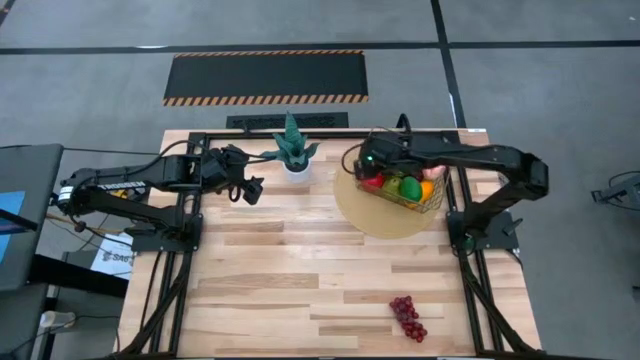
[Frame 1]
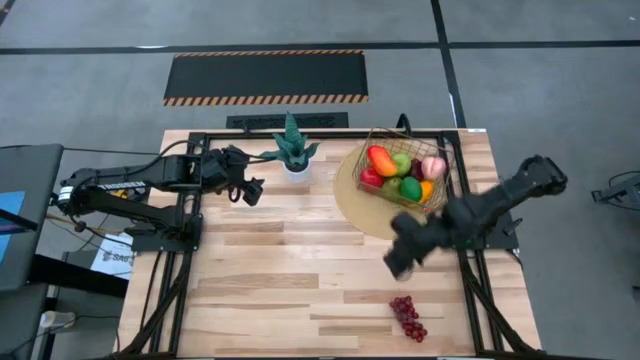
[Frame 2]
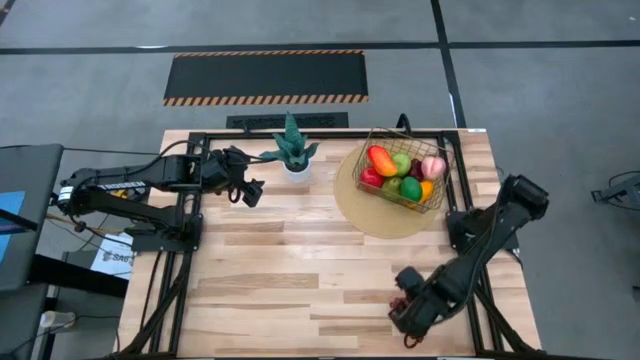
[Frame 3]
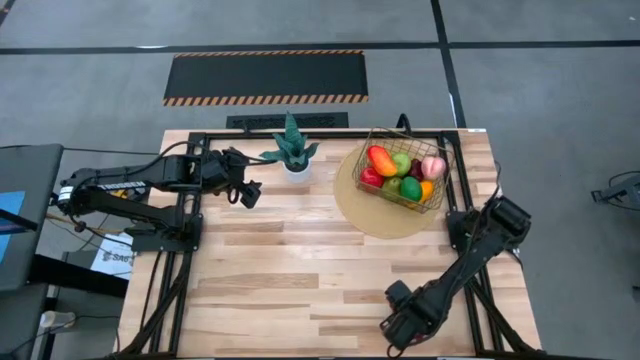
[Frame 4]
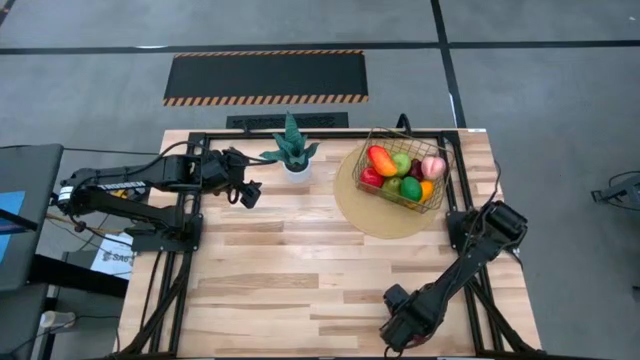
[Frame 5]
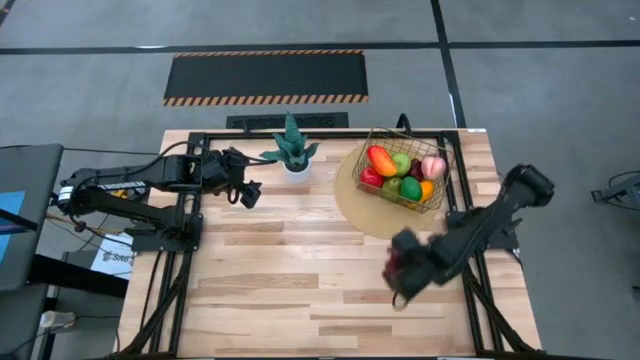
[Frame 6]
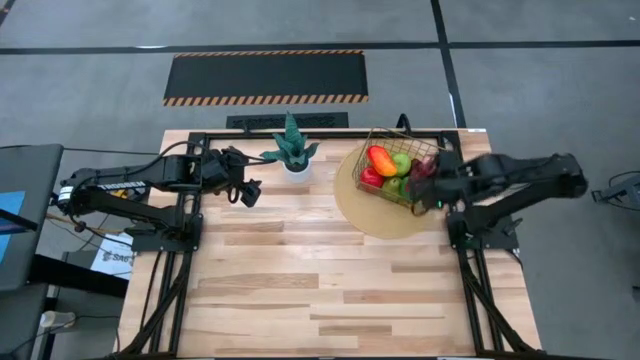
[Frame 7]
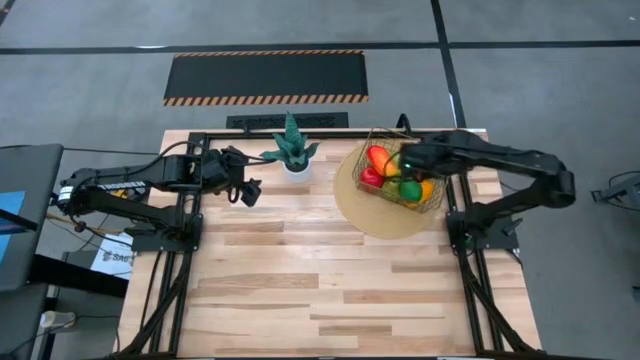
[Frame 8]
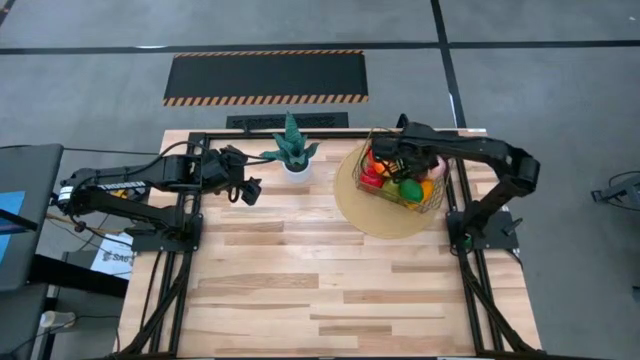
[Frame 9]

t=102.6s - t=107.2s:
Task: Build produce basket
Put the grapes into the wire basket

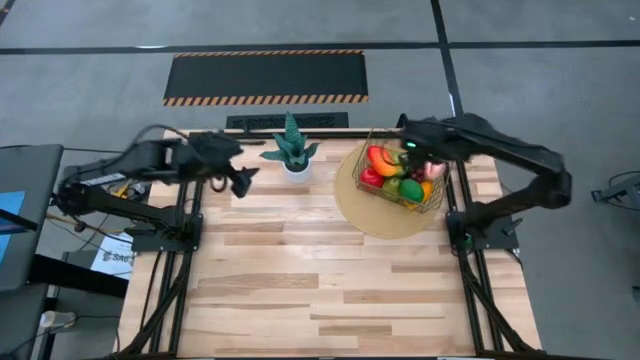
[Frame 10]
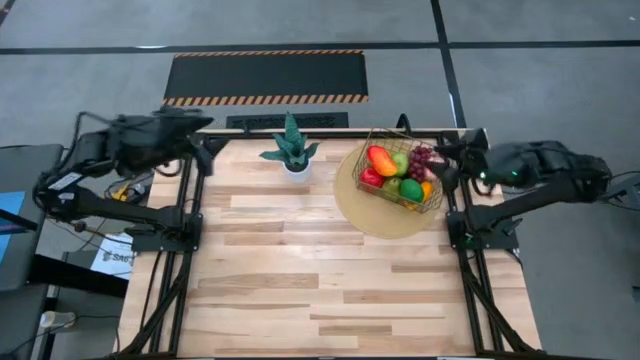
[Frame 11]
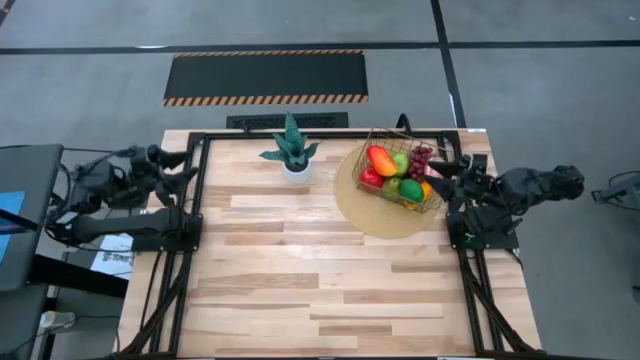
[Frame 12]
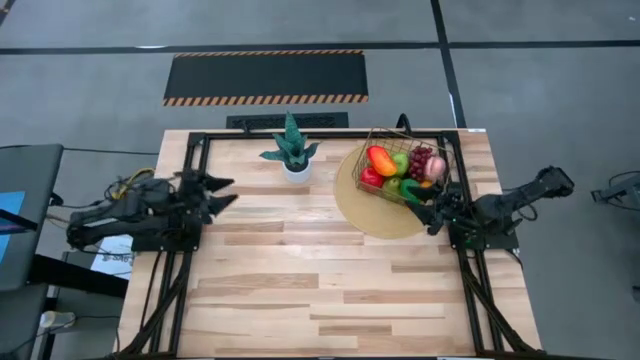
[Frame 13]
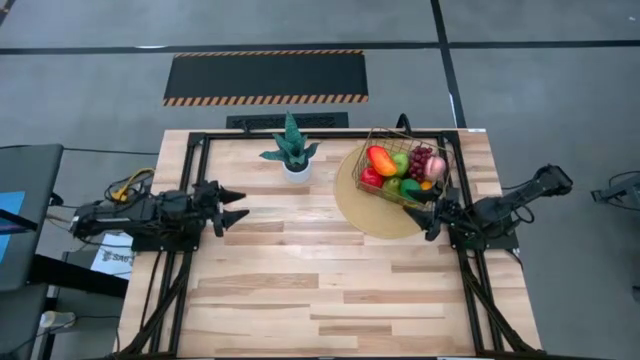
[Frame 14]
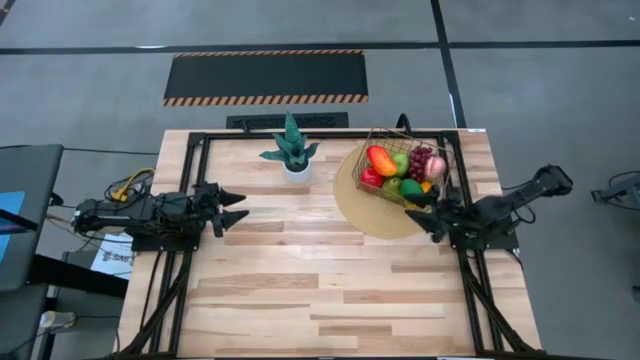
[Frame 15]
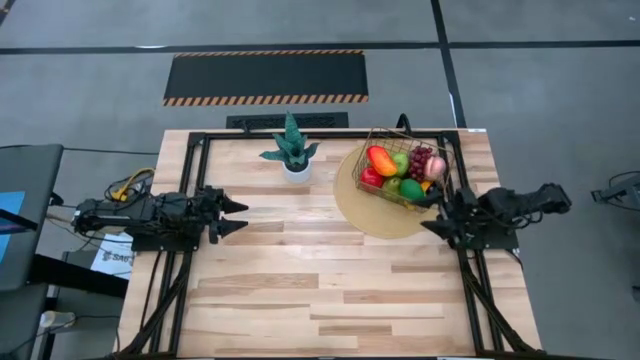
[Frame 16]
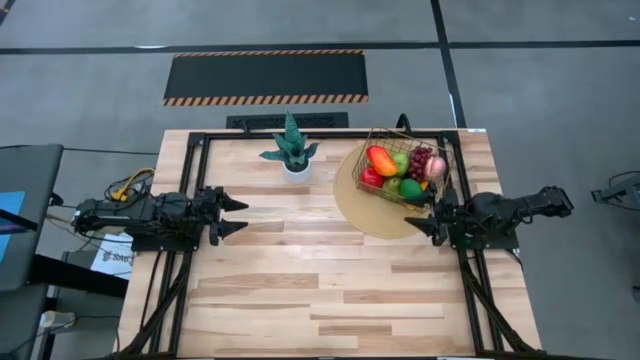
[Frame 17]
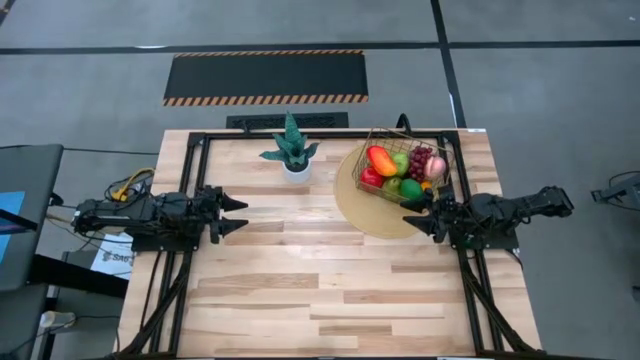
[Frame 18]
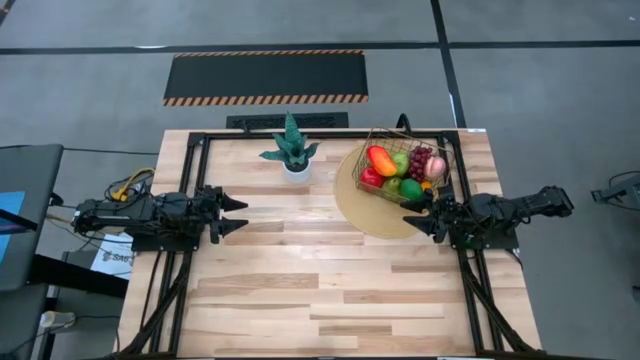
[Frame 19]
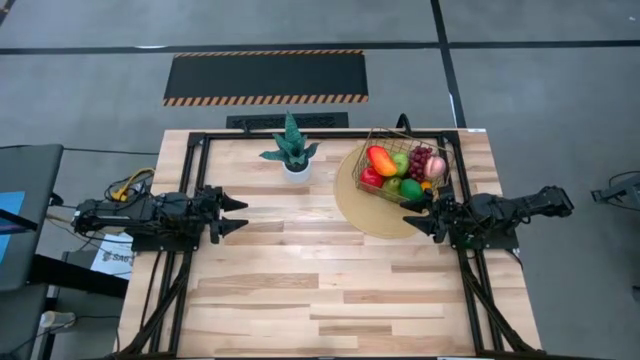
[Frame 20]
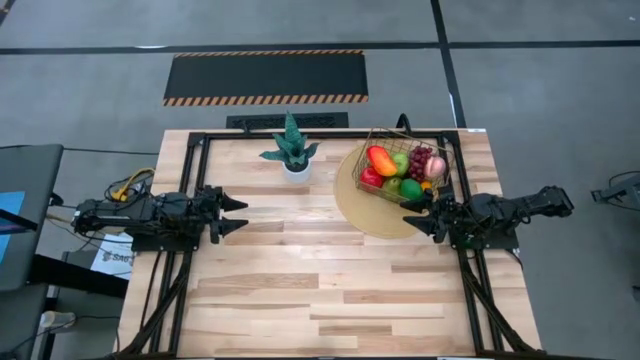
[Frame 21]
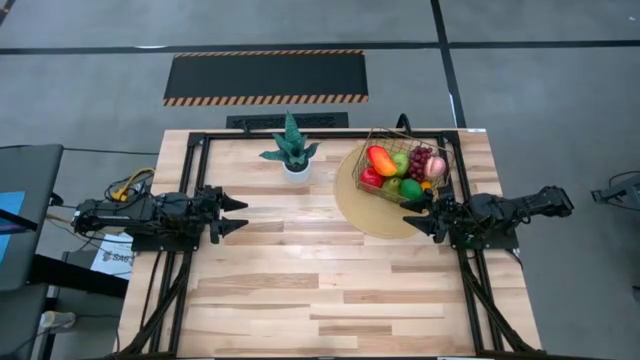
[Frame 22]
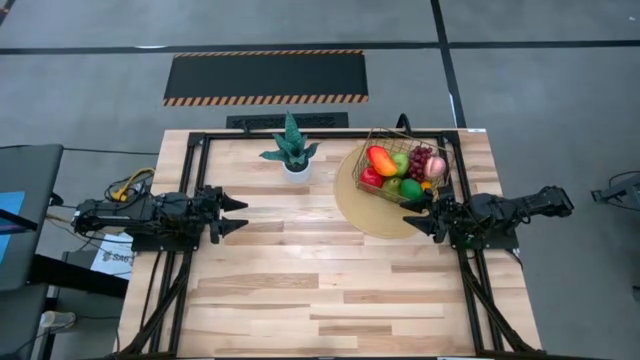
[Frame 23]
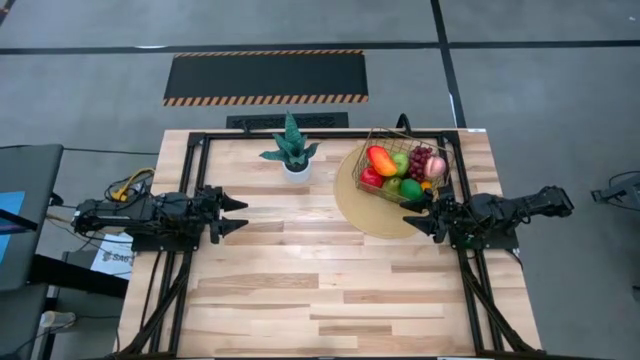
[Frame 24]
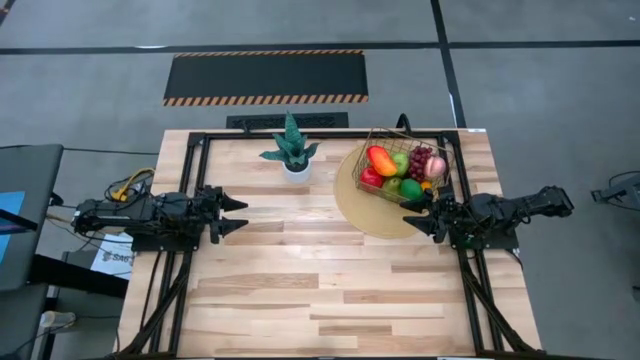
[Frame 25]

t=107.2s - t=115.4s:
Return to Home Position

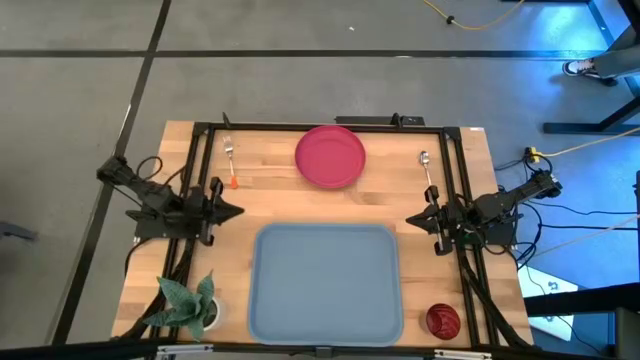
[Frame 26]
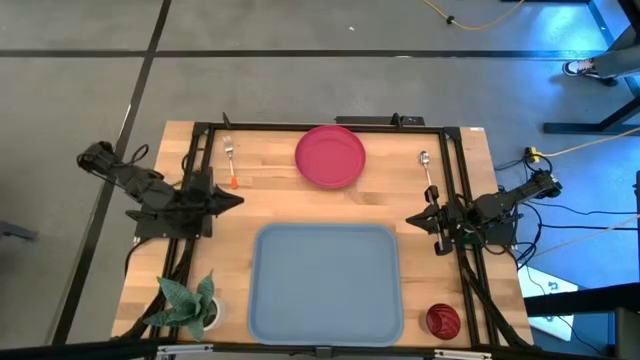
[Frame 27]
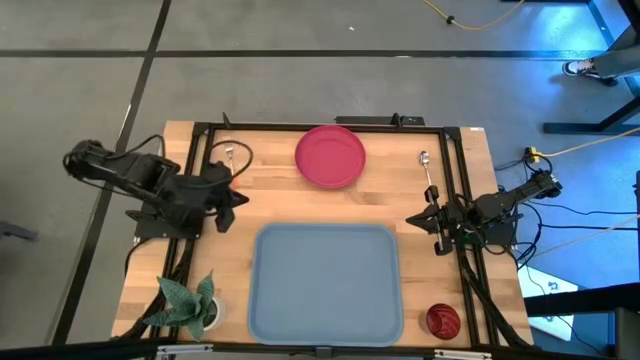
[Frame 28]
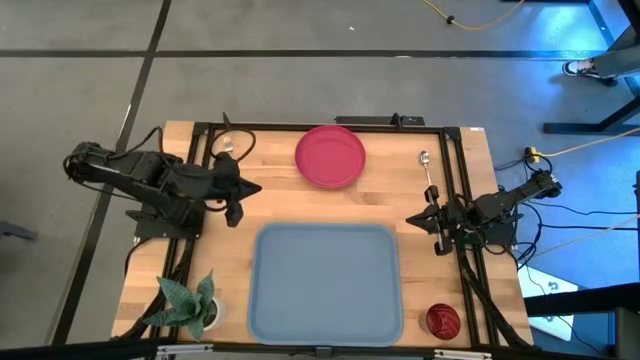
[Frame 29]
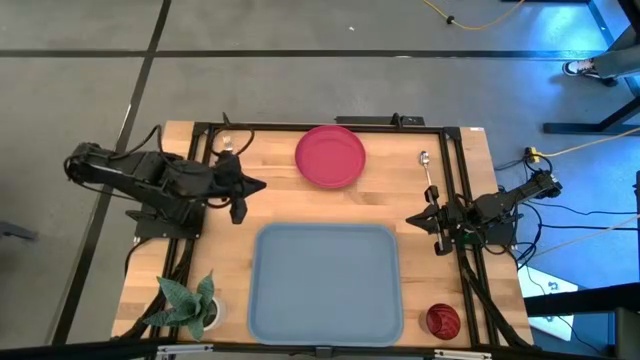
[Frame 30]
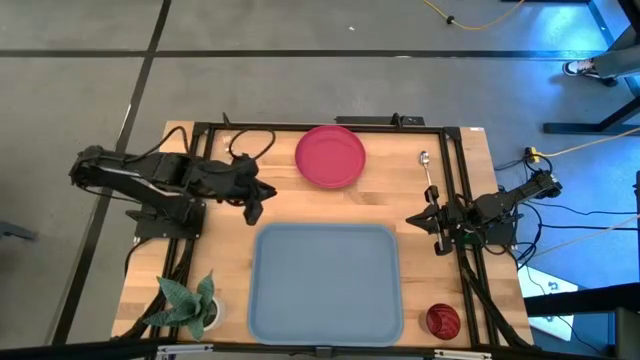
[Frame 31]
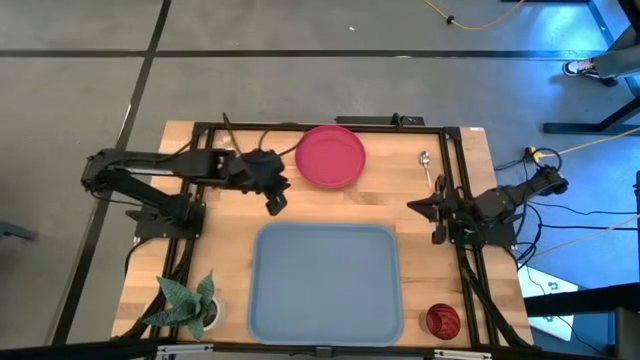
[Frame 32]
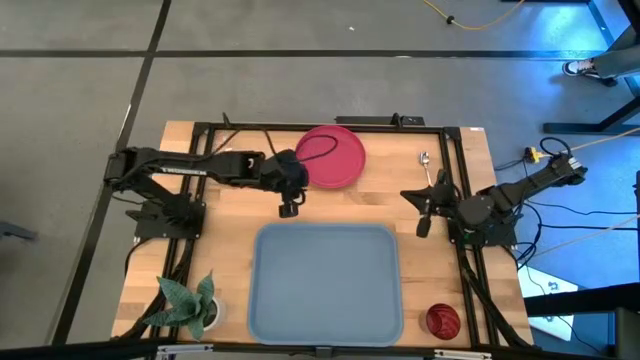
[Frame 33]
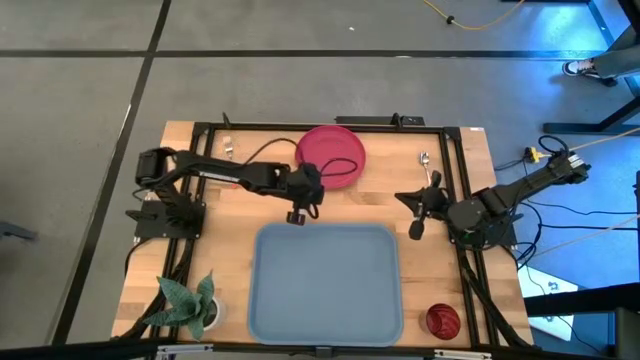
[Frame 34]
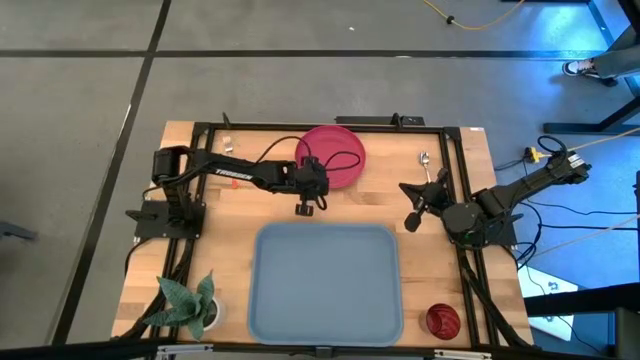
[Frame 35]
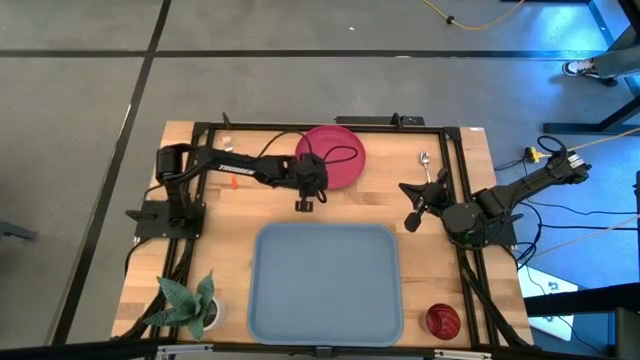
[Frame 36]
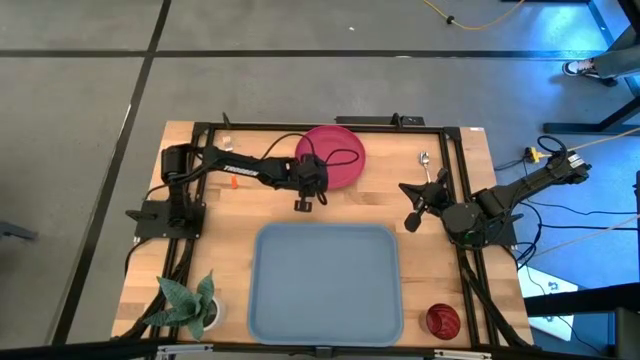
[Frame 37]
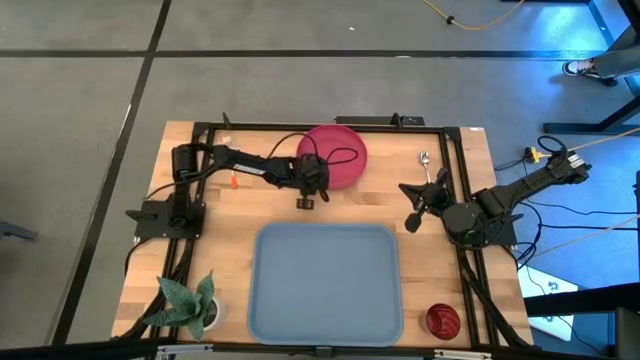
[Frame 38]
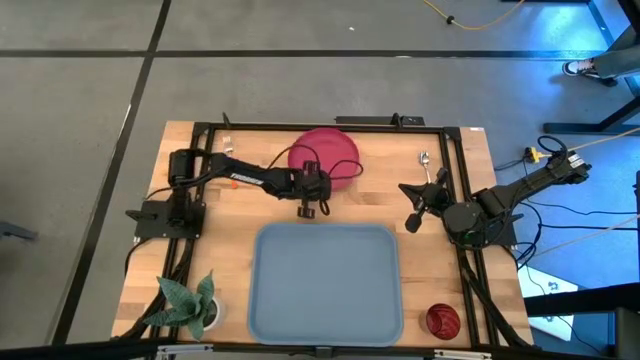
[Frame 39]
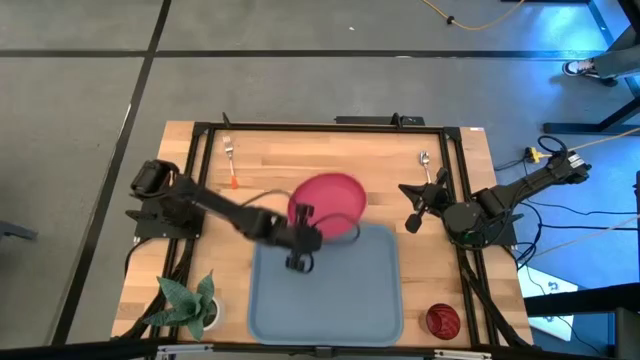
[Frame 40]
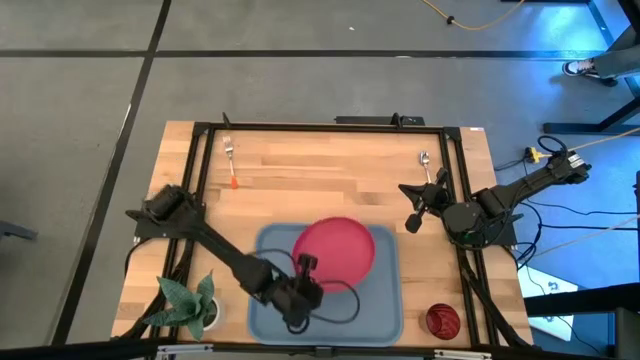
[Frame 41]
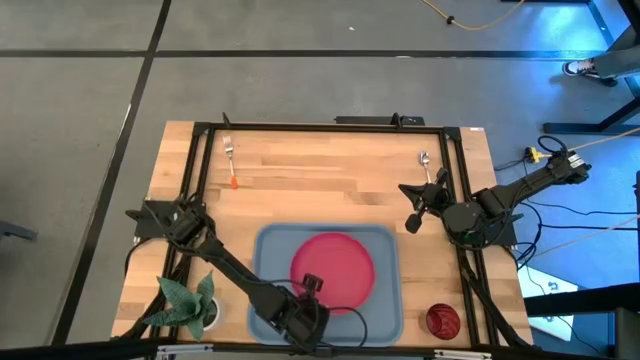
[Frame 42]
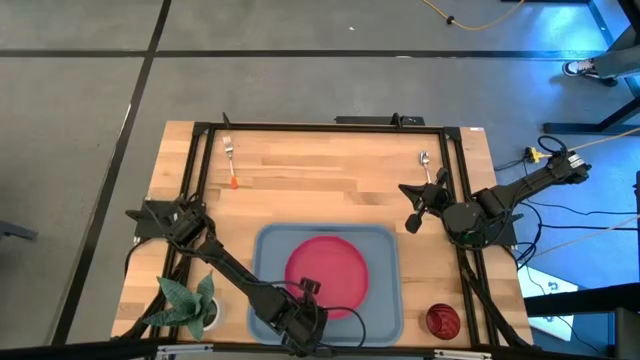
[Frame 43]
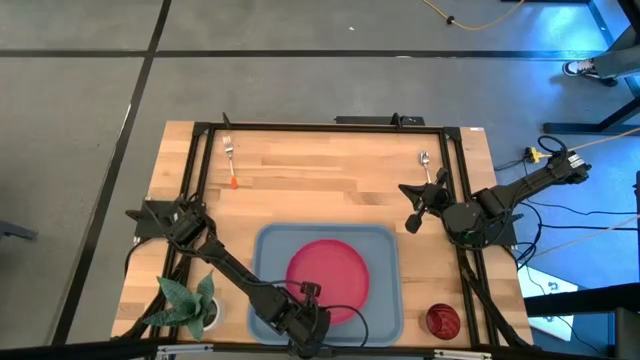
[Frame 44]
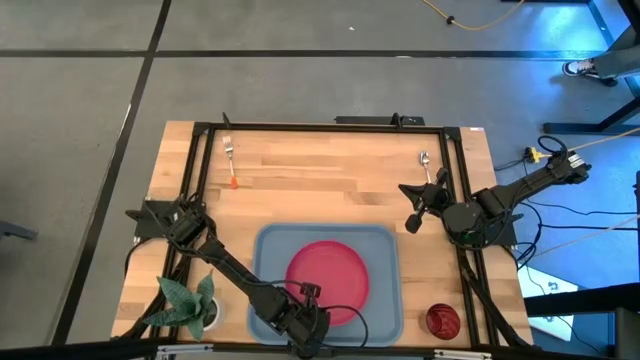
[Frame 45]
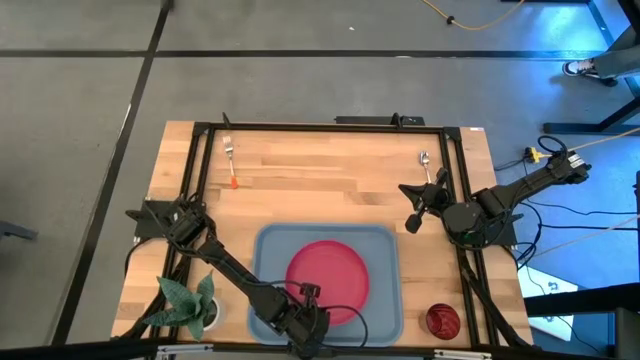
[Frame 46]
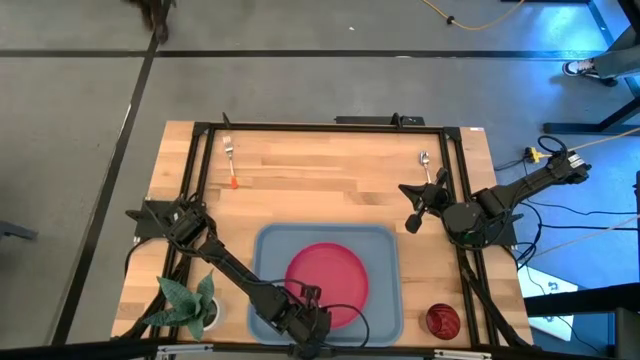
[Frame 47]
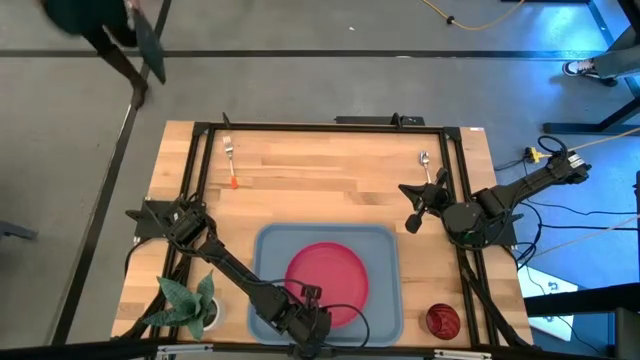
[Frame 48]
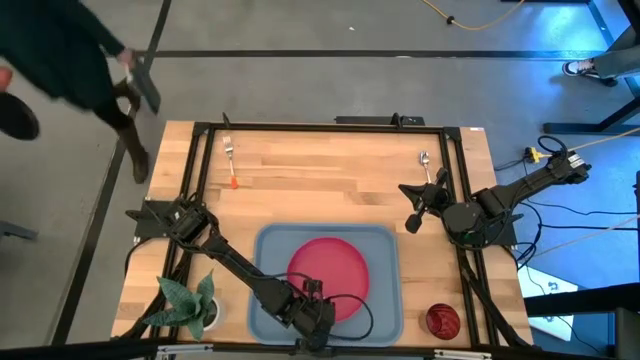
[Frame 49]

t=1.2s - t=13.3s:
Task: Pick and place plate/cup/fork/spoon on tray
Put the pink plate on the blue serving tray
